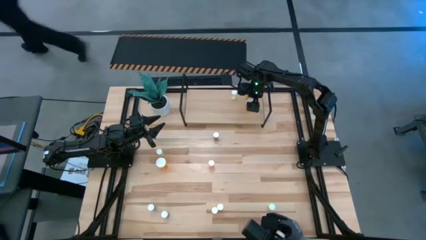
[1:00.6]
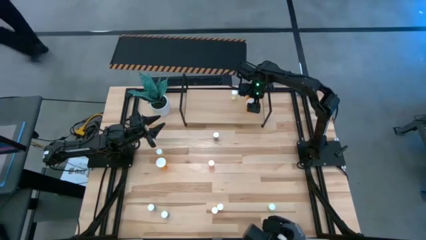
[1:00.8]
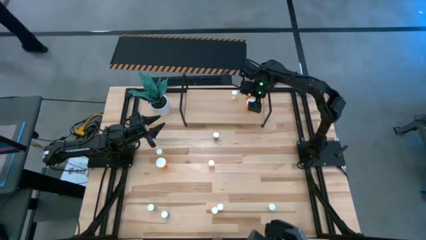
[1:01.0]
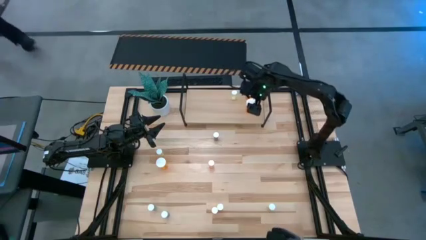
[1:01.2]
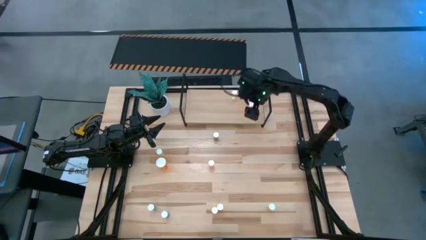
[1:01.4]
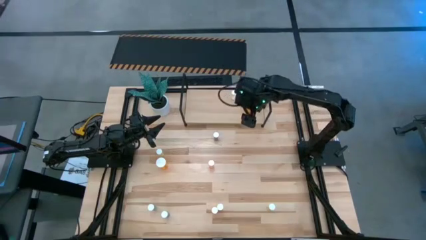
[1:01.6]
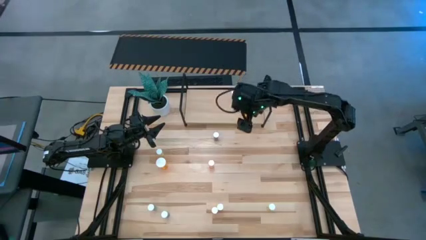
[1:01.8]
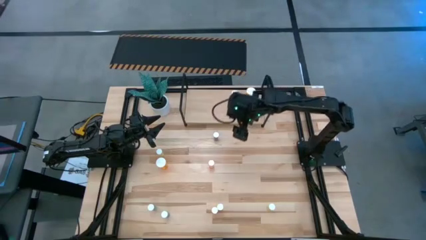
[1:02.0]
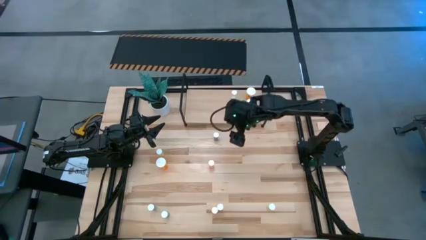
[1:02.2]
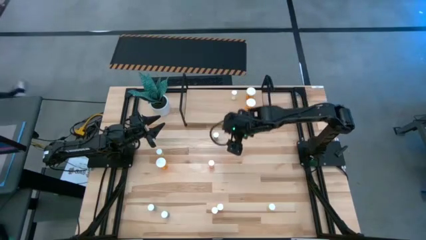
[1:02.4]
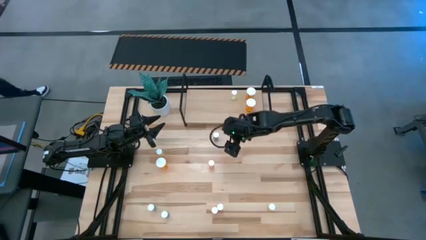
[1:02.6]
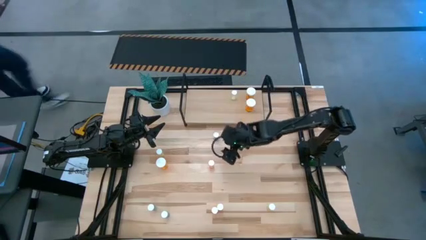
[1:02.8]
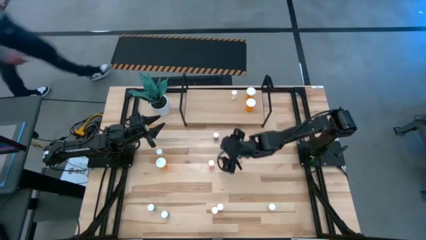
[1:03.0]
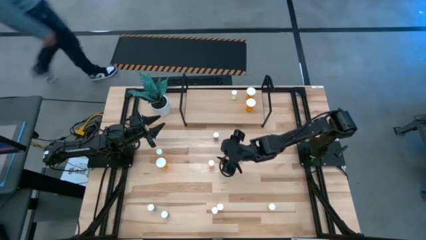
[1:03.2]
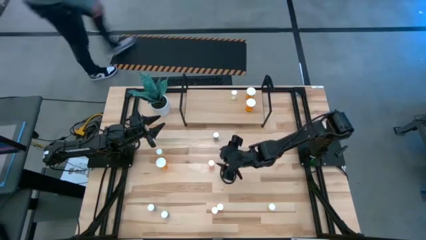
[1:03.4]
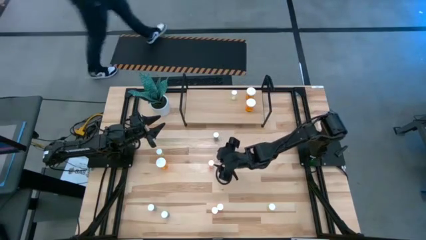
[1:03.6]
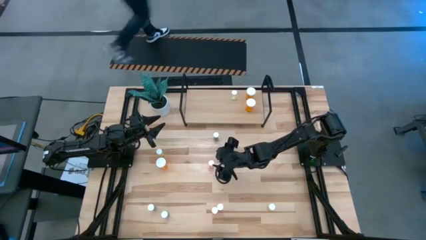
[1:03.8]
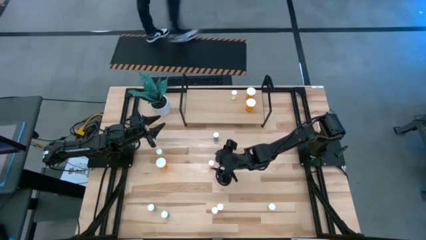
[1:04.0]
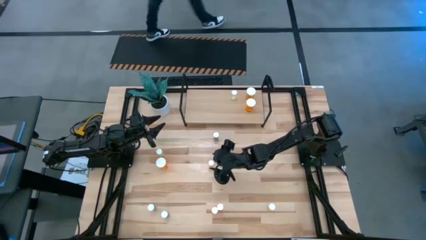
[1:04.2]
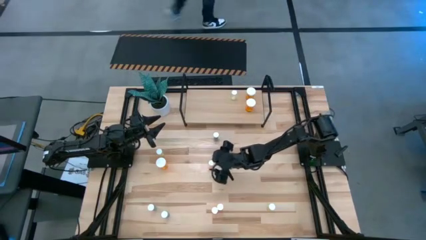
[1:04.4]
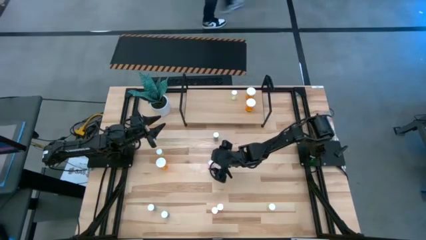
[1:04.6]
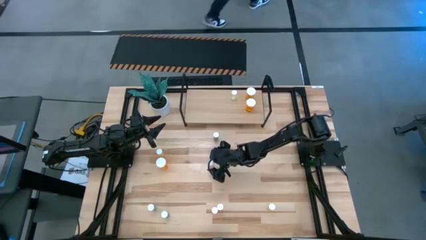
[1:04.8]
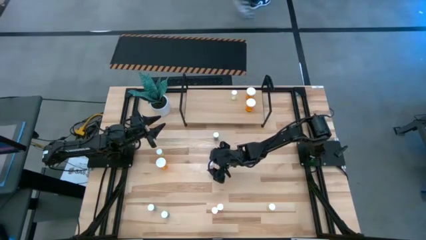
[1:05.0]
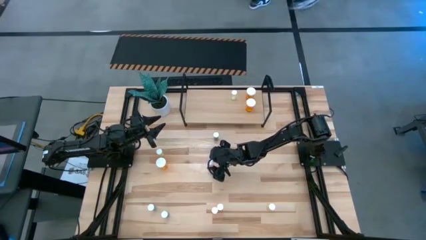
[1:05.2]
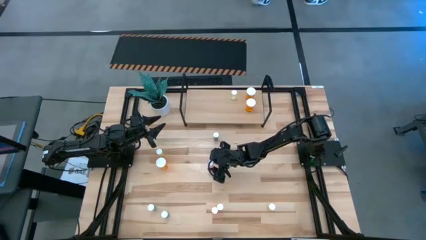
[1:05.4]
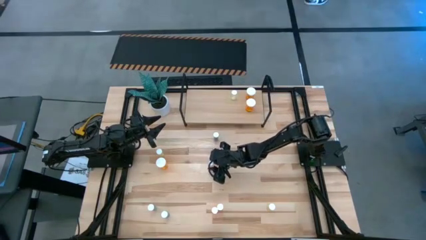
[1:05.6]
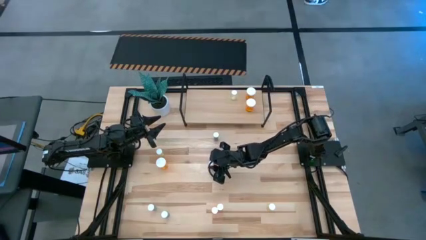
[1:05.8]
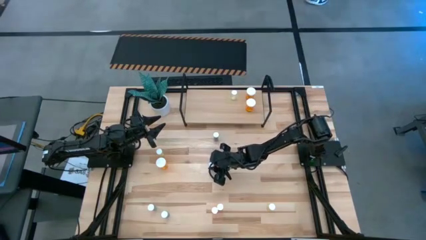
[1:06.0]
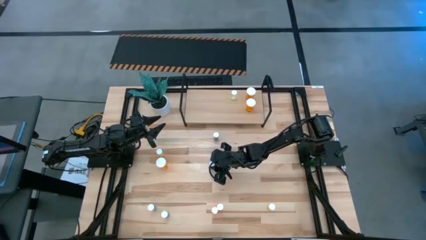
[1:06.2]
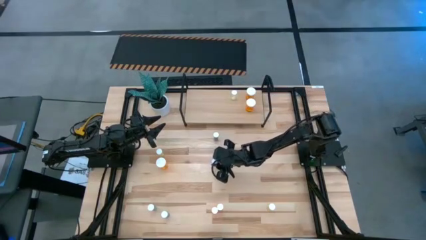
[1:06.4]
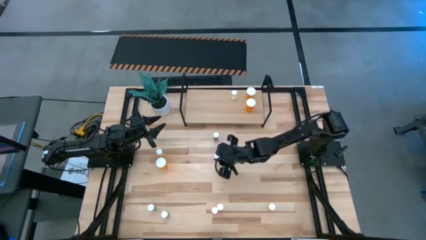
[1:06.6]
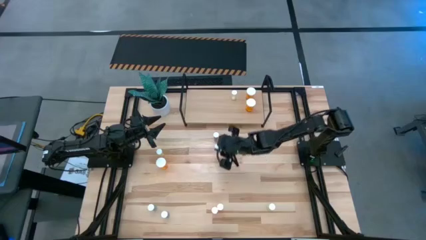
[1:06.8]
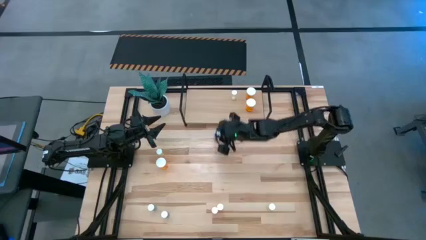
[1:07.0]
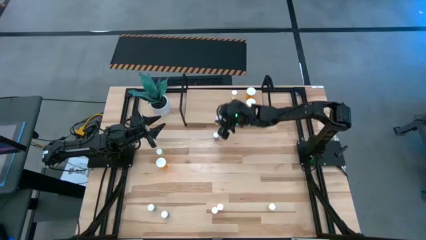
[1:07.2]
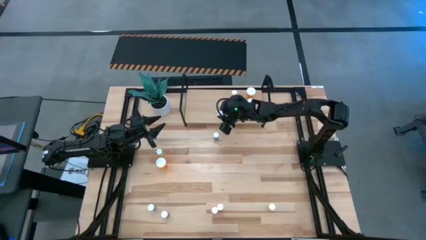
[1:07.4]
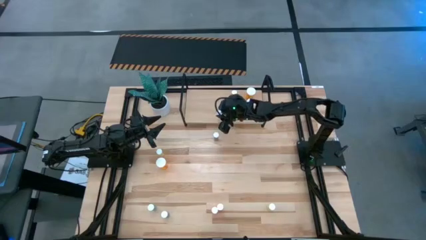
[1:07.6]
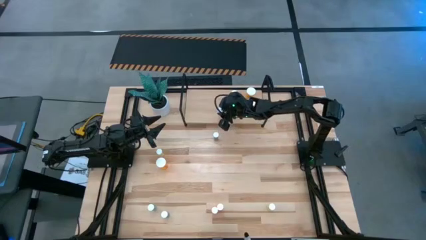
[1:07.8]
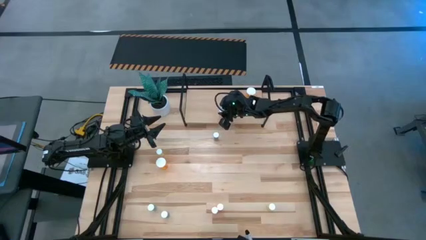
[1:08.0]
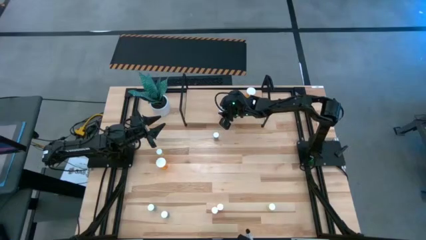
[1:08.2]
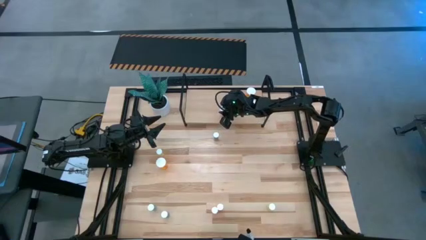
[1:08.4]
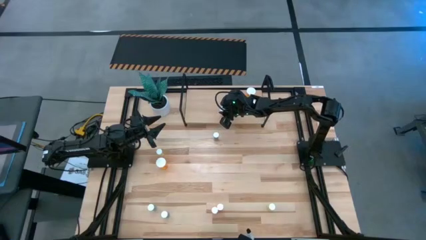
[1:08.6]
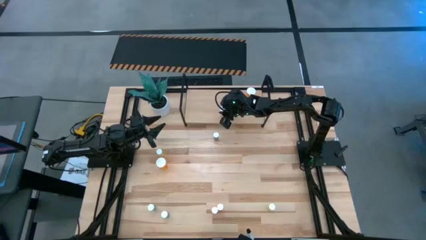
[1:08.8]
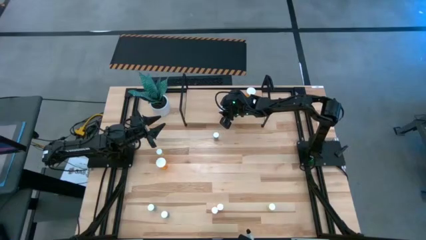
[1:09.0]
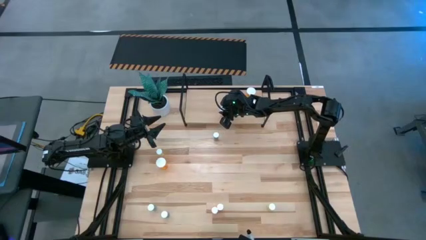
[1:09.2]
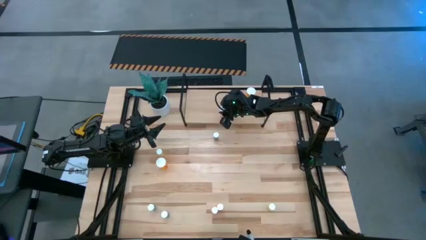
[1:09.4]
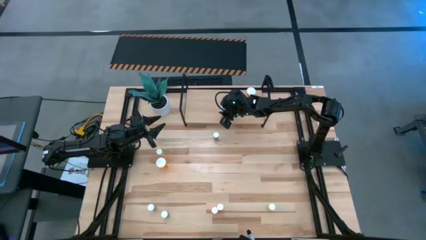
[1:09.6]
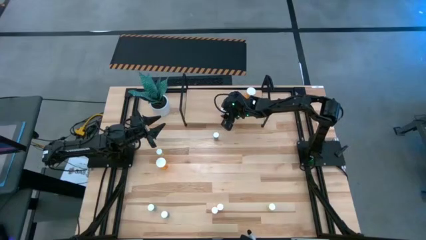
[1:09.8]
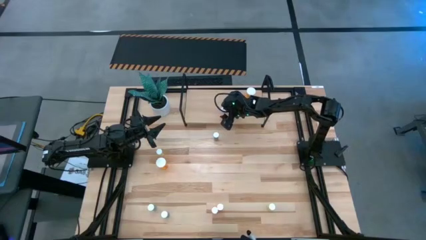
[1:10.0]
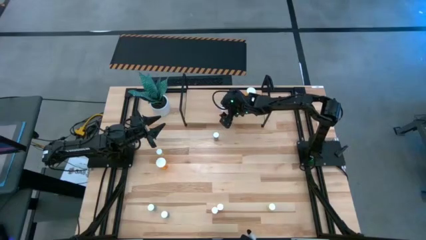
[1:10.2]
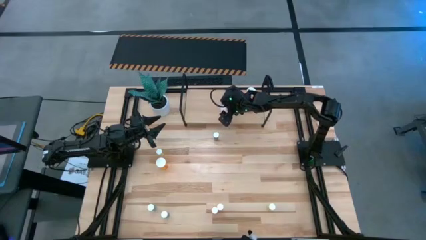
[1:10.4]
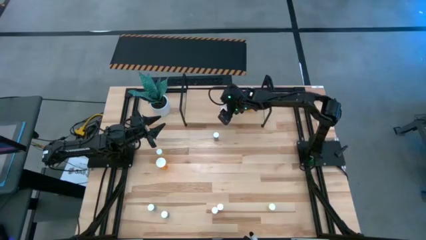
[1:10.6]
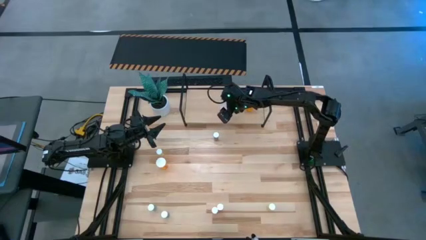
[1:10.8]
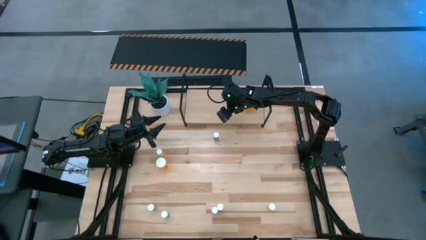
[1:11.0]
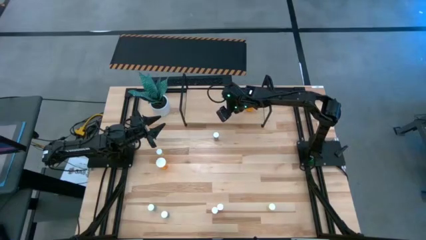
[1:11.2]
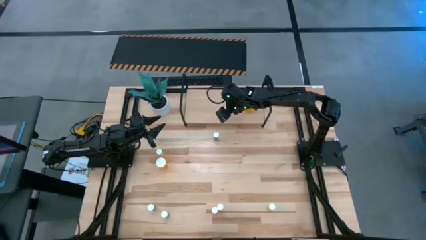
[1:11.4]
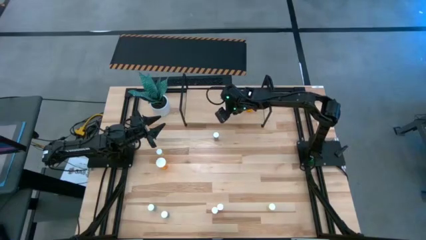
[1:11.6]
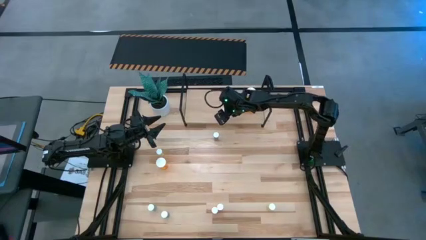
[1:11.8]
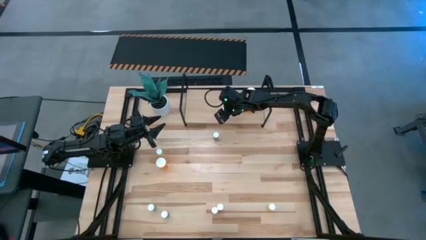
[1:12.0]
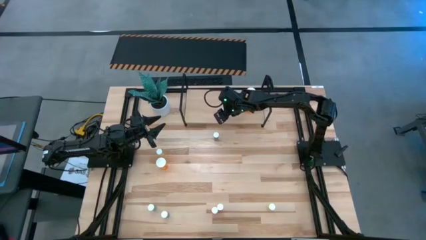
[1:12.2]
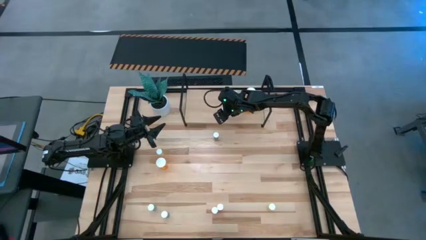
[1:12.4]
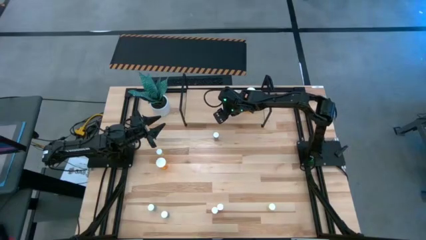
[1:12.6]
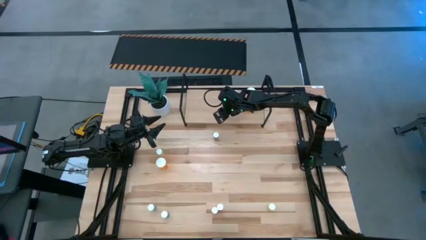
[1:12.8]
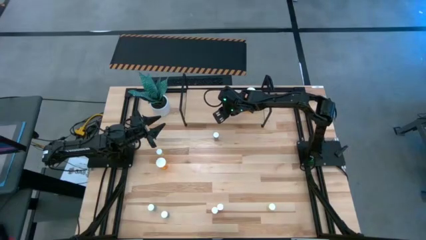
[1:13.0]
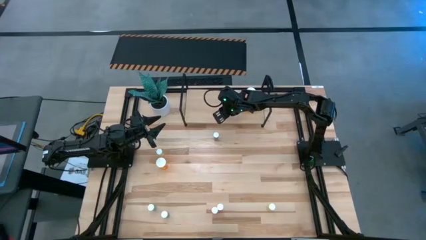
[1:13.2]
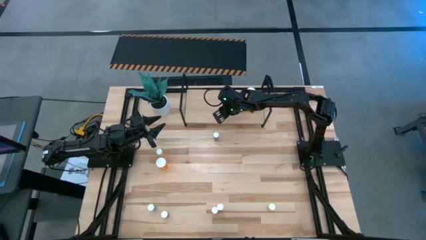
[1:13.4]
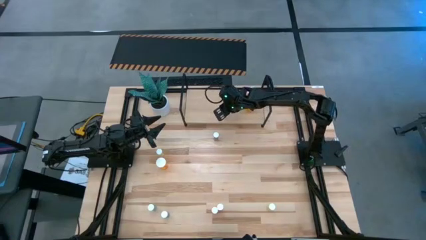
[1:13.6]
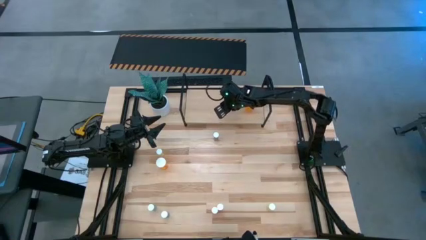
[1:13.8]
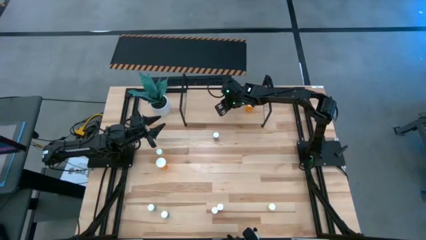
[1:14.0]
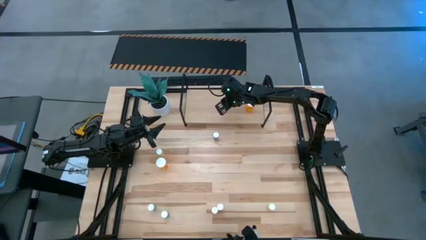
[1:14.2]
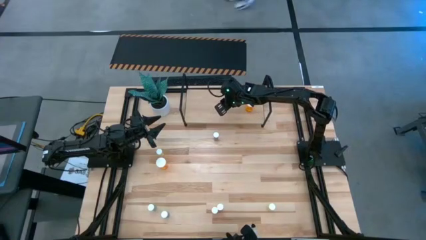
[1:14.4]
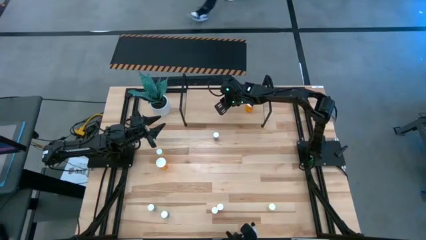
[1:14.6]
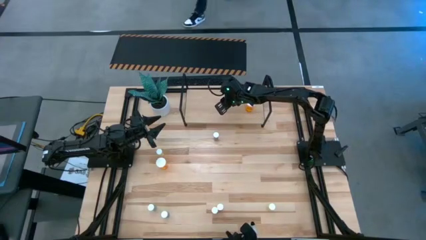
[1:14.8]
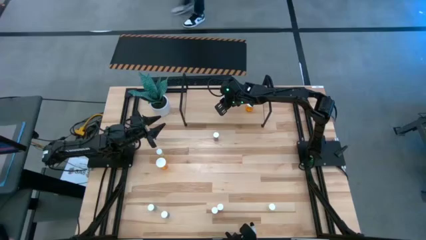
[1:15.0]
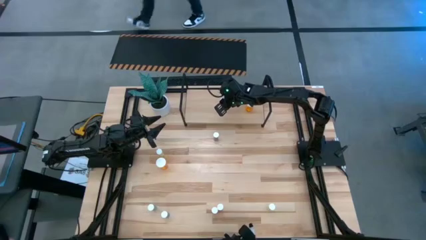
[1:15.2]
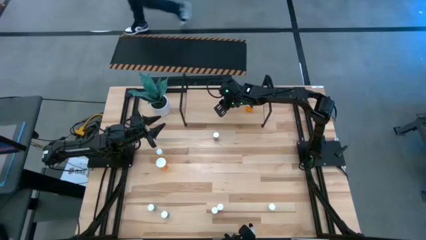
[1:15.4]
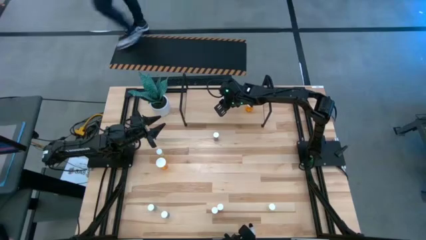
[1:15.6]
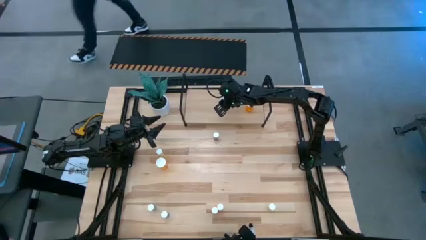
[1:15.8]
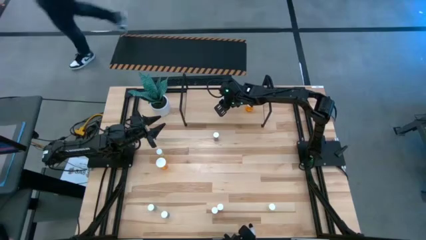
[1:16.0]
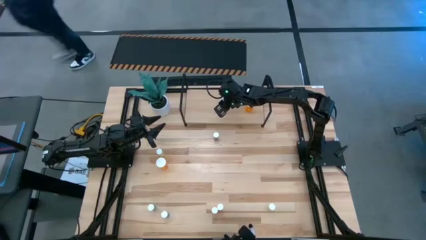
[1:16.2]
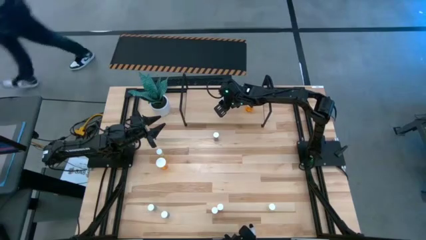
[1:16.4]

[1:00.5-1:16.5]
Task: Pick and place medicine bottles onto shelf by color
Put the red pill bottle on the shelf

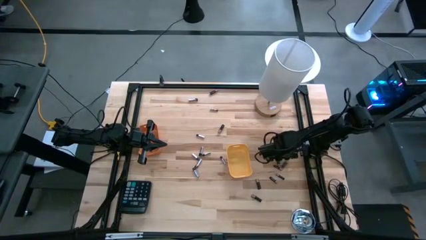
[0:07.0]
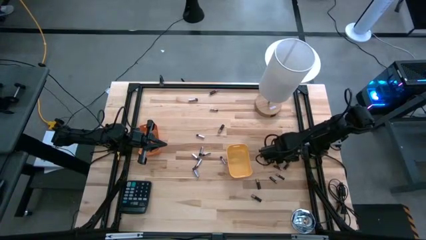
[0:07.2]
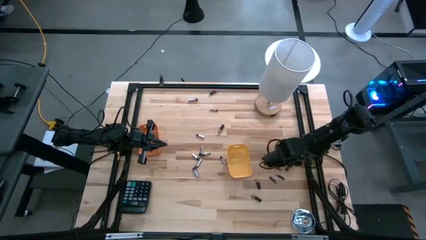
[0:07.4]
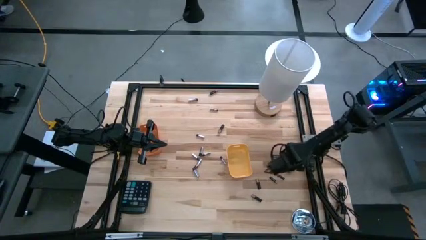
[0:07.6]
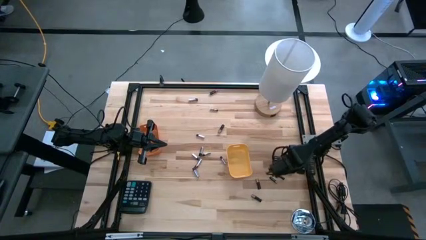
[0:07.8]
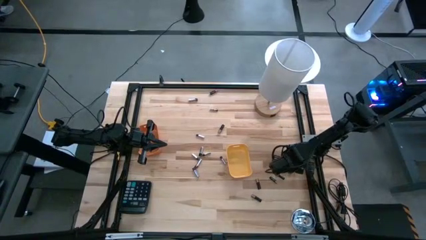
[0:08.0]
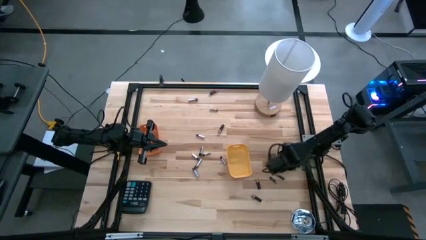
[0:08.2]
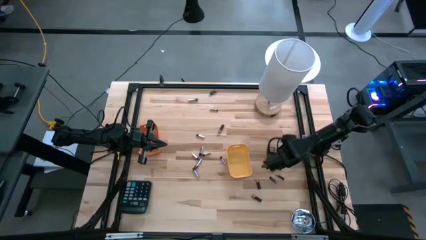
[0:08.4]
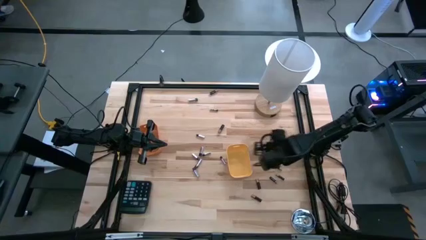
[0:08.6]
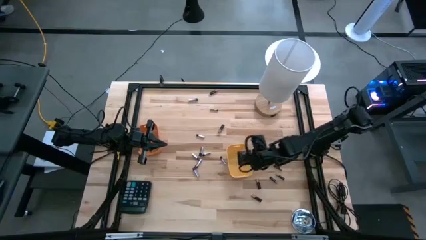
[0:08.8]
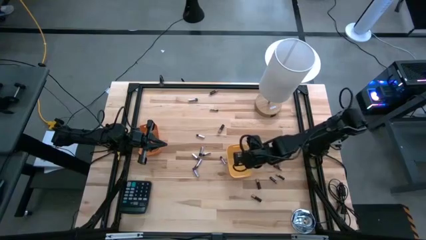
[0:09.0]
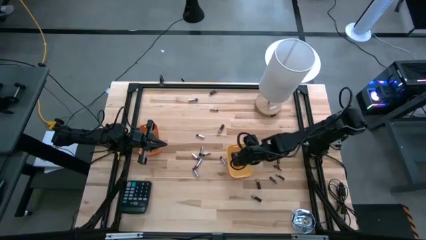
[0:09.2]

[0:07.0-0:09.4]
Task: Sort batteries
Put the black battery into the yellow bin
